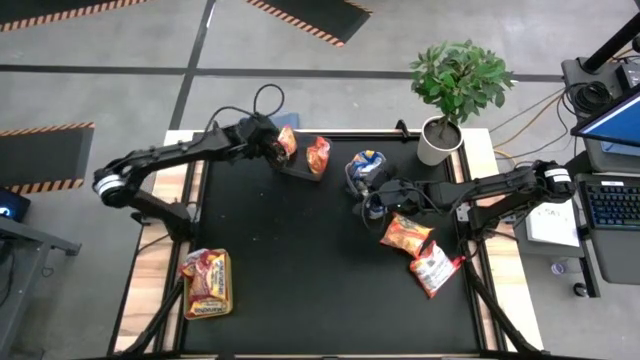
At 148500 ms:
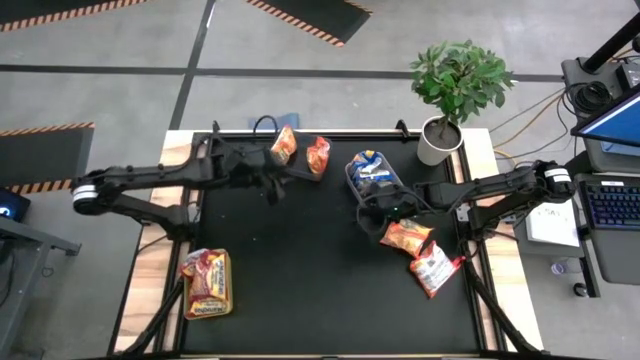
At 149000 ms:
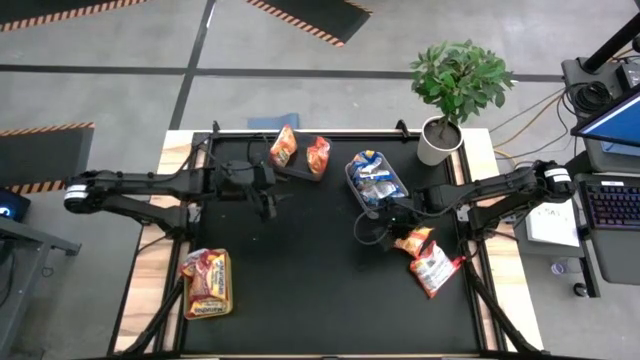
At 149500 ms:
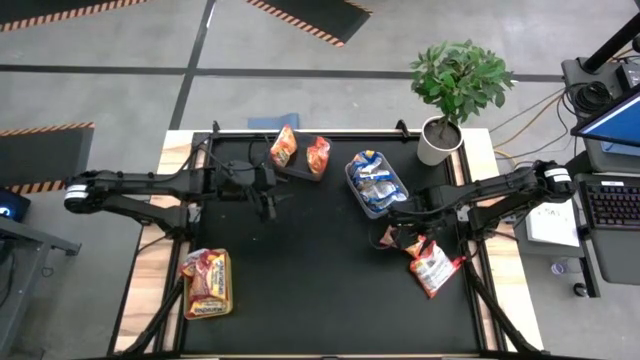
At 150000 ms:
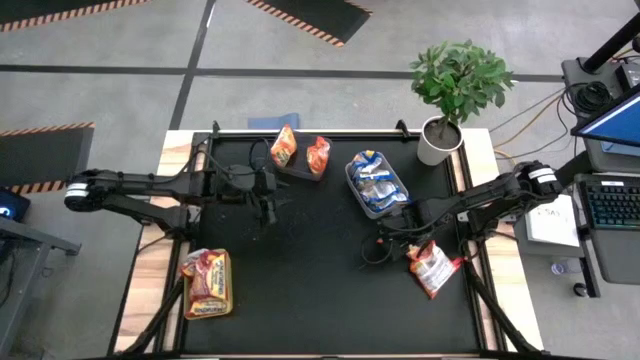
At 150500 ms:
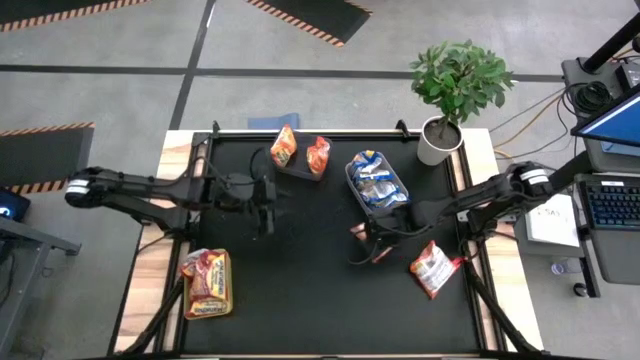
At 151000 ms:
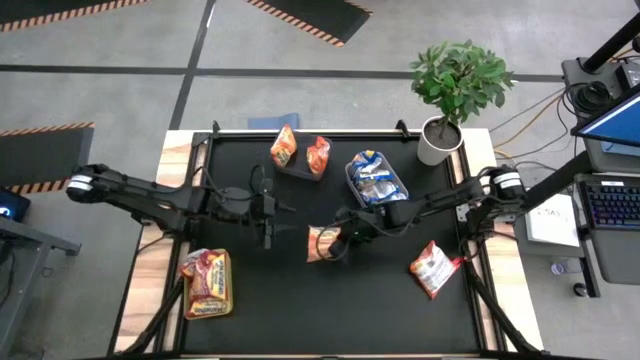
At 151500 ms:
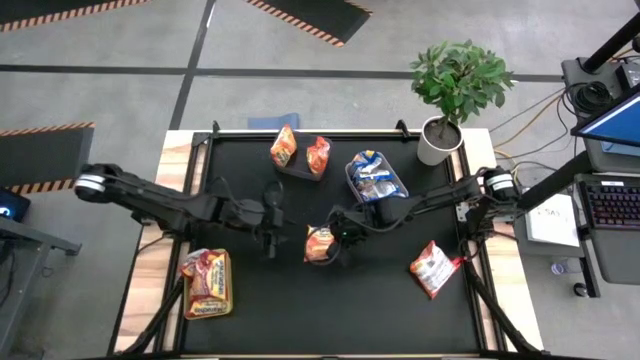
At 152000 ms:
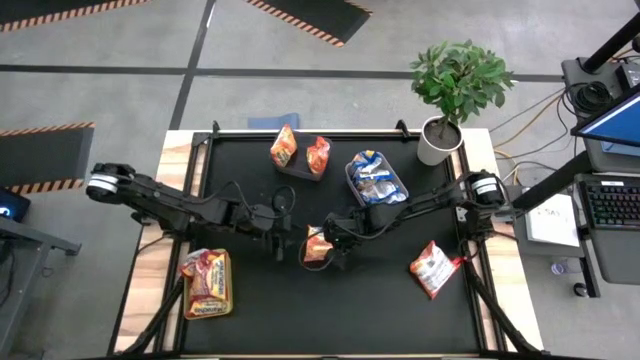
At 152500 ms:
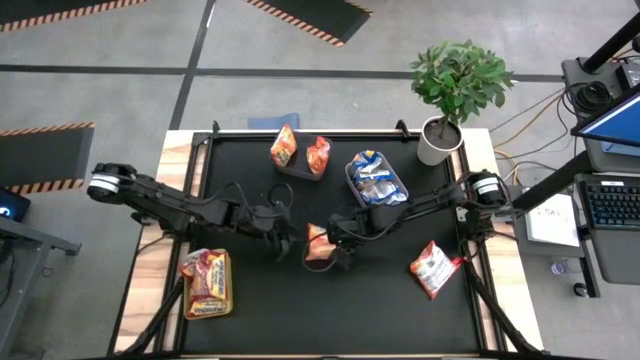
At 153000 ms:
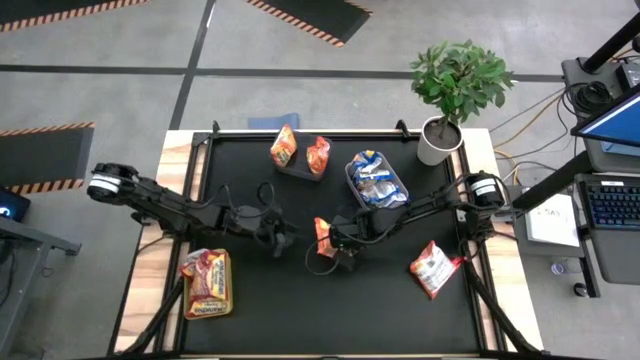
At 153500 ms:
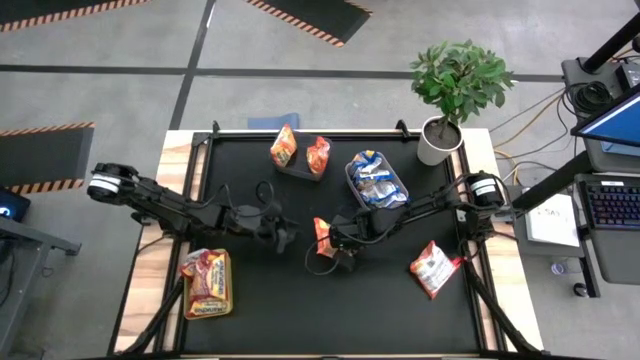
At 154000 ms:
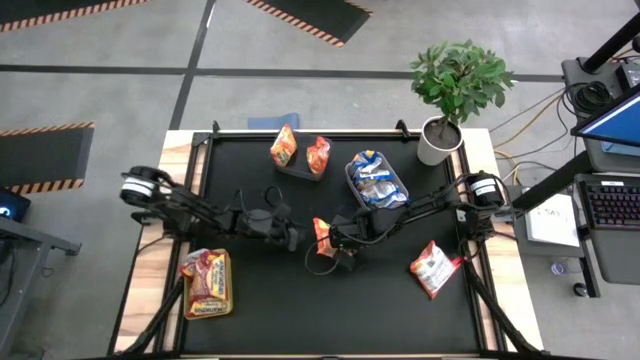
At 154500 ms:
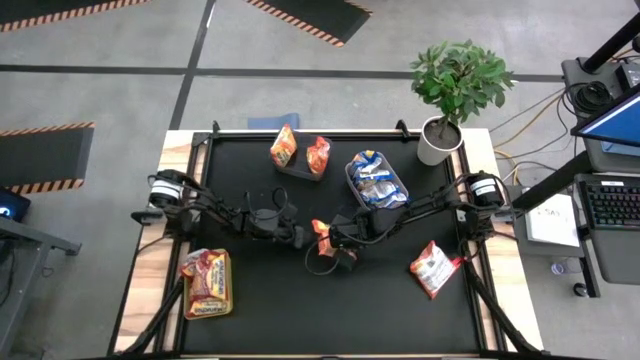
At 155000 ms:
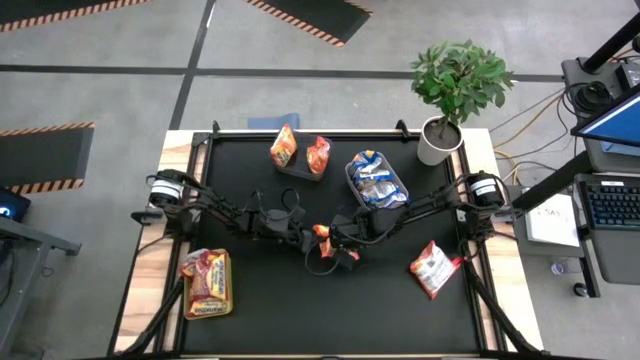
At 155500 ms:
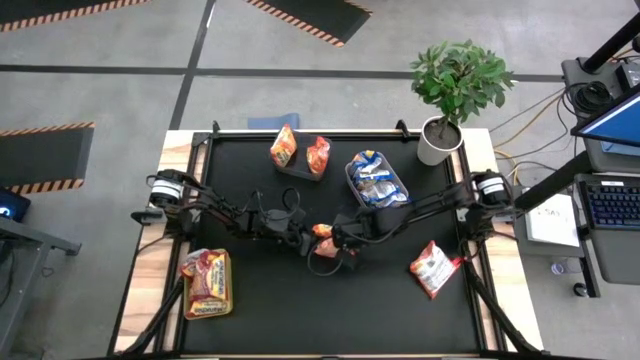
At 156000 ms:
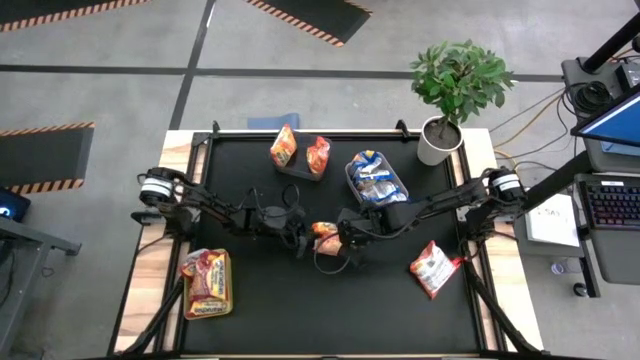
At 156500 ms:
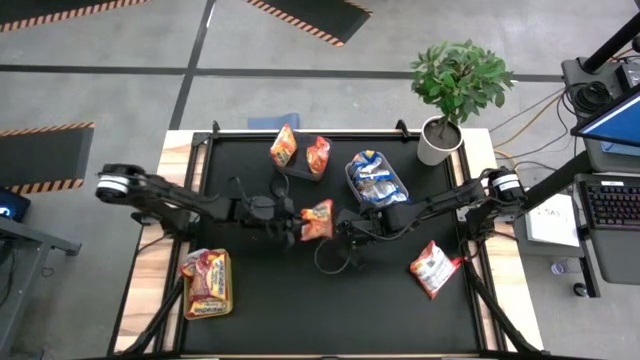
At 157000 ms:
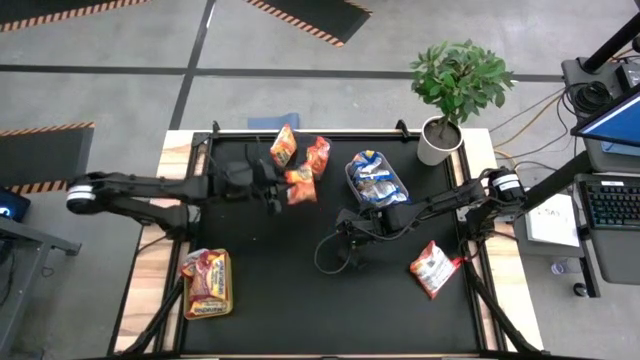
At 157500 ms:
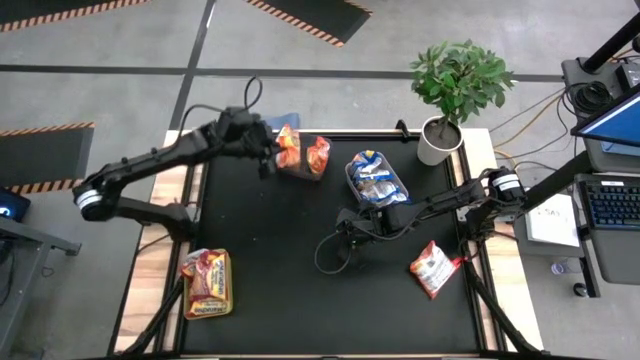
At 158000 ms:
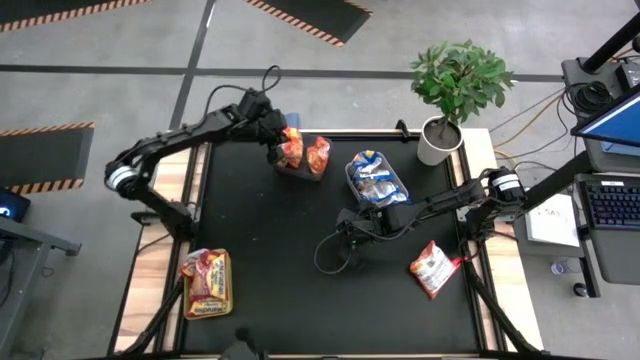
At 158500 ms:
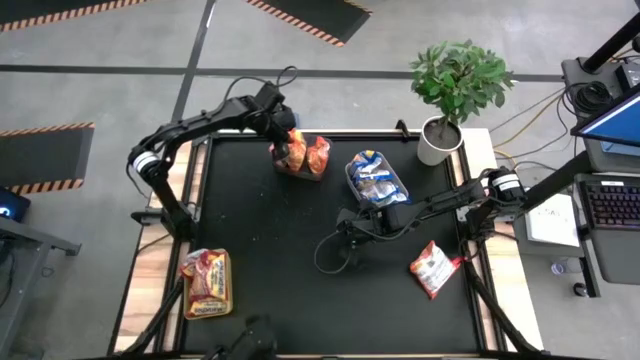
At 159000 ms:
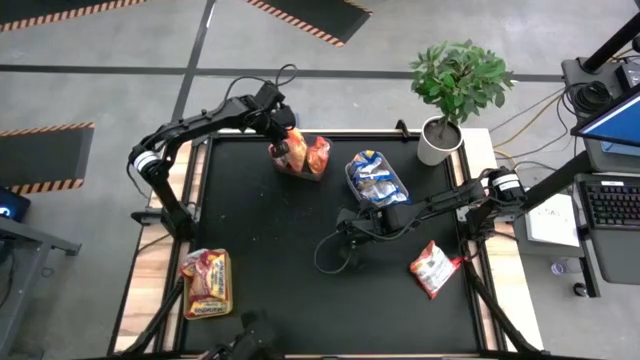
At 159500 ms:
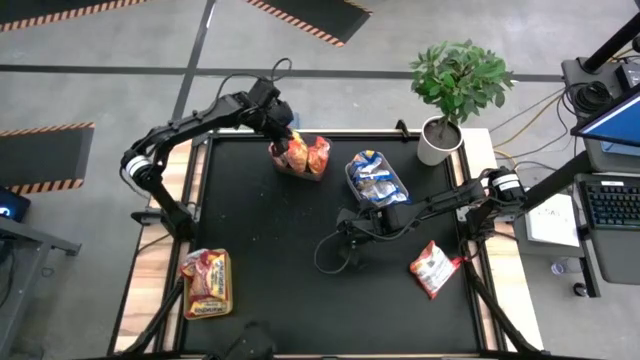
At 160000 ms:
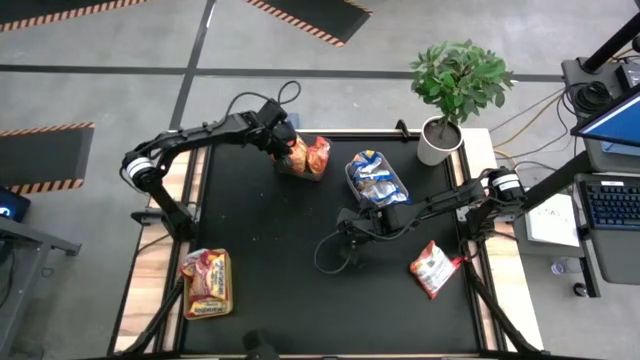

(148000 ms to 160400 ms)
Task: Sort Maruchan noodles
Put the orange noodle pack into the black bin

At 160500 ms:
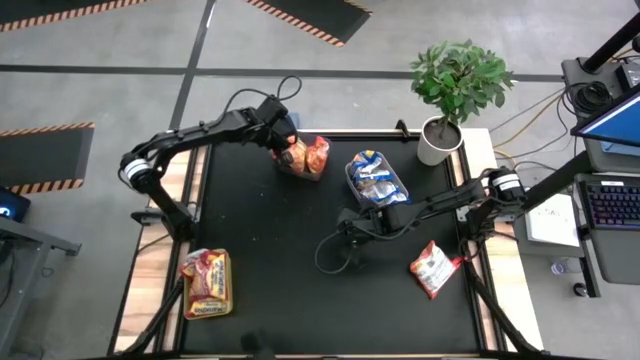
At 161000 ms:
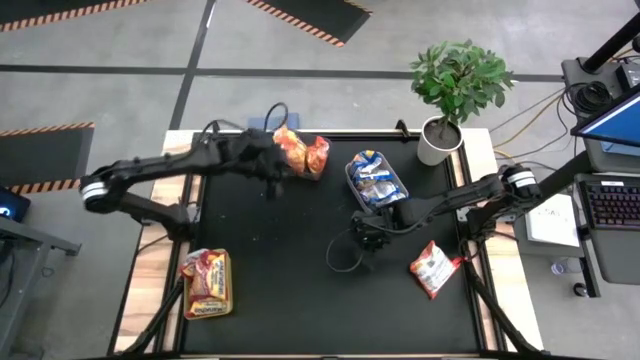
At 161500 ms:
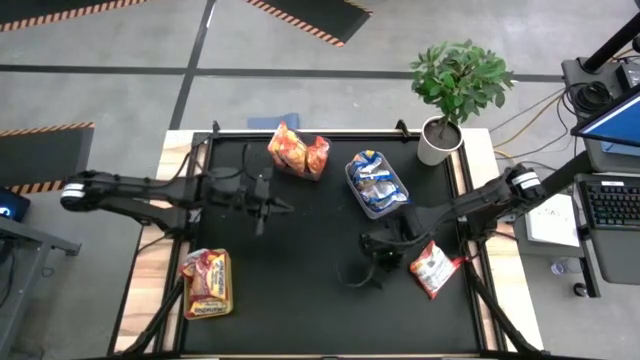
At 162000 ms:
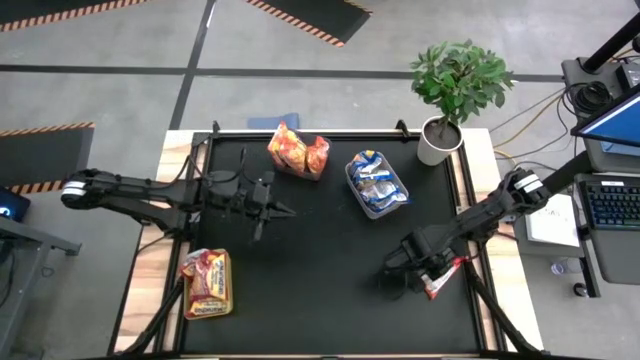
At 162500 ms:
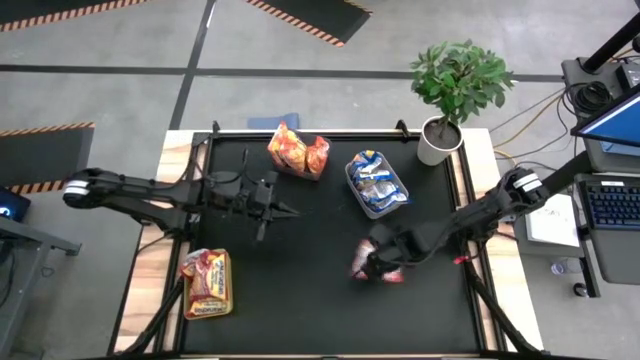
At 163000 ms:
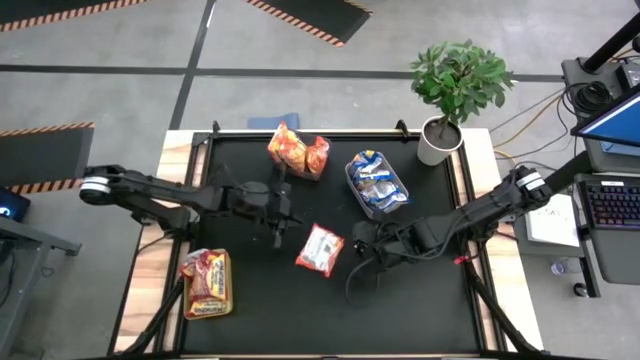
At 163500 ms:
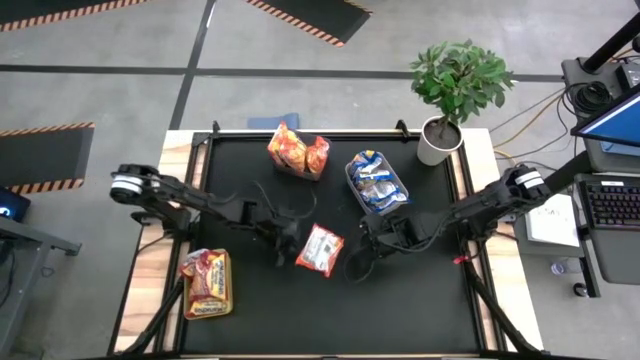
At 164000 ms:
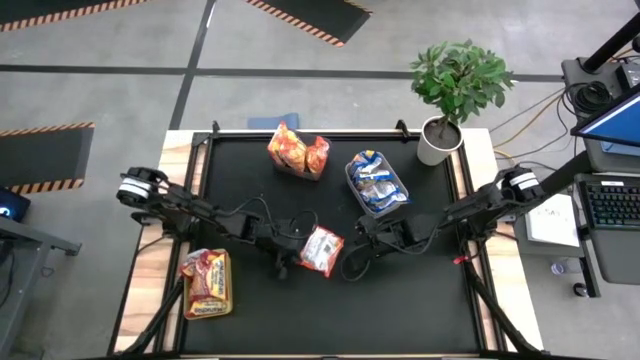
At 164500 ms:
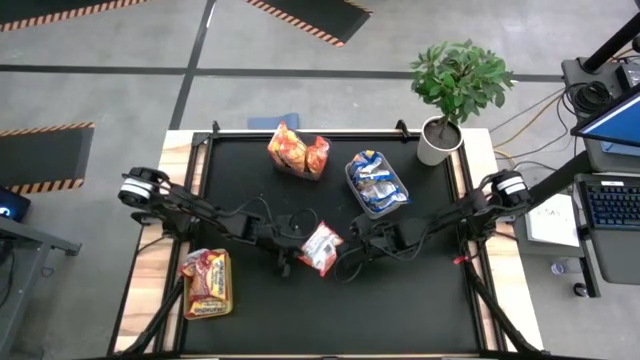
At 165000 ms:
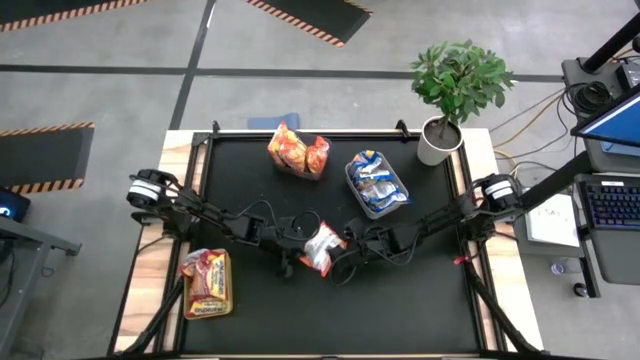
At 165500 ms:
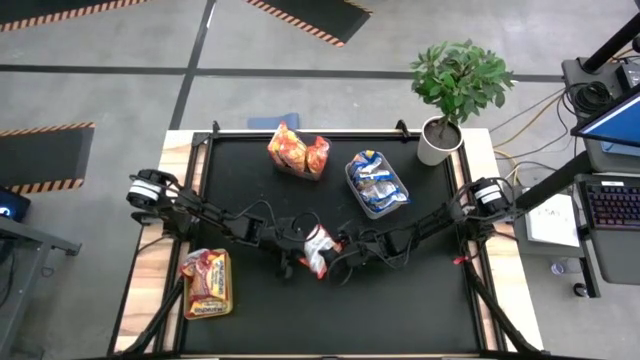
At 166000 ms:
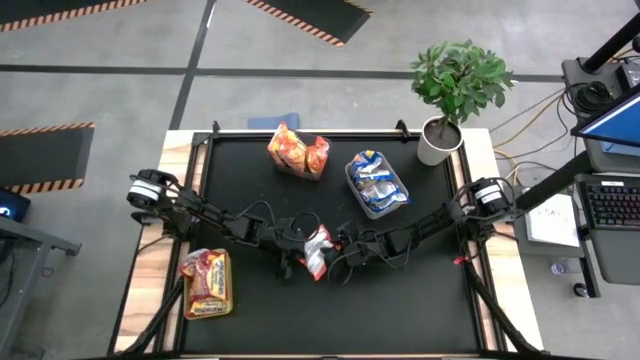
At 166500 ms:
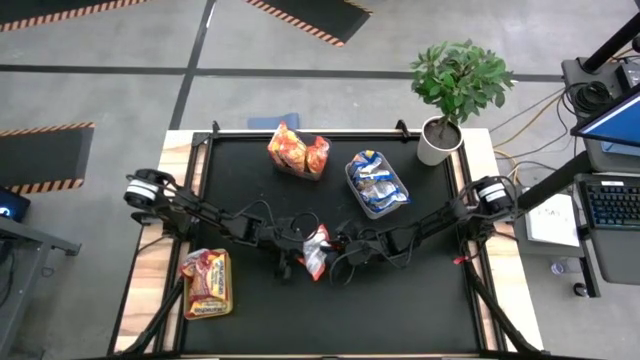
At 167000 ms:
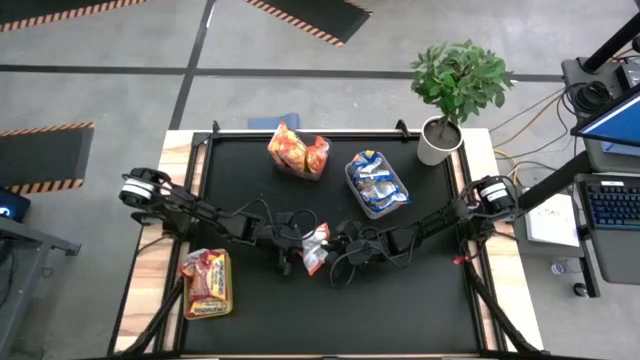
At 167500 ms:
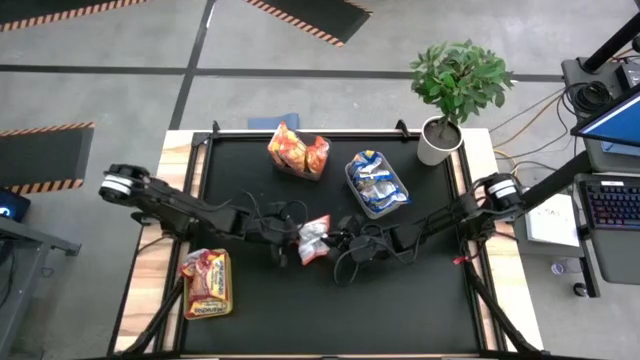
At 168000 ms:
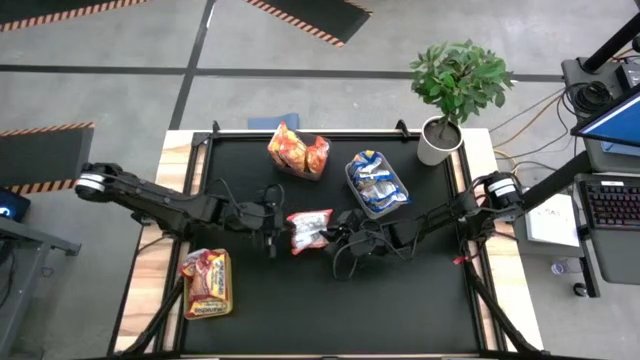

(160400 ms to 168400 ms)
Put the orange noodle pack into the black bin
